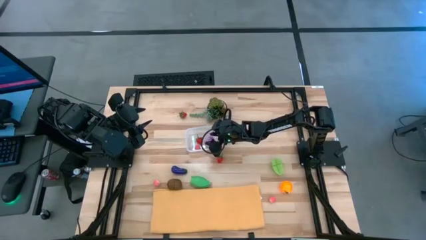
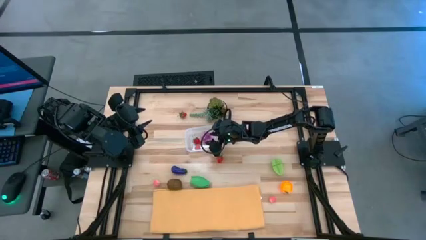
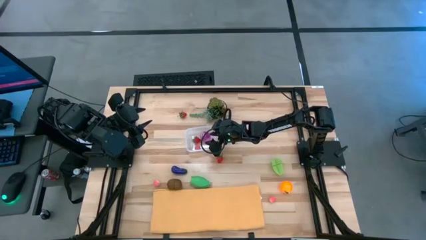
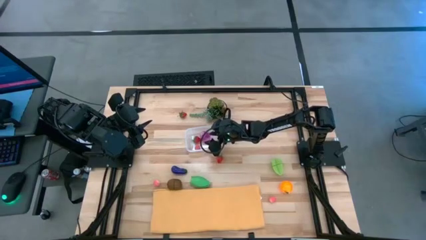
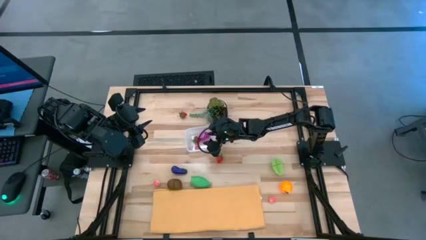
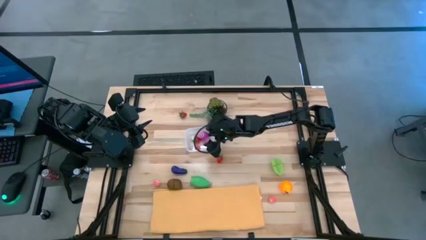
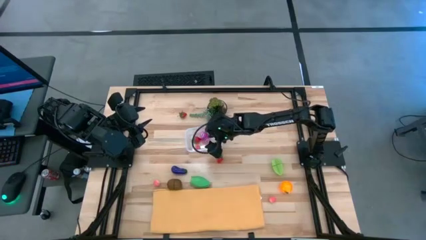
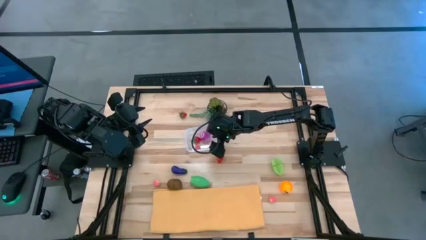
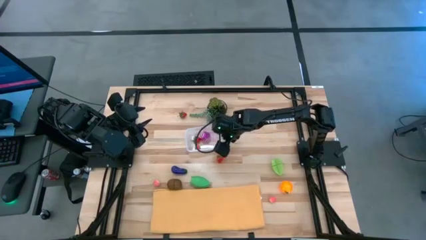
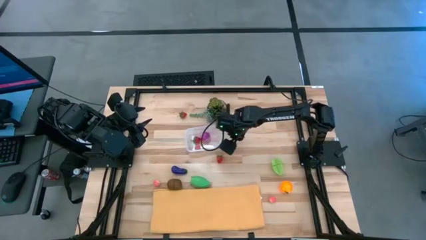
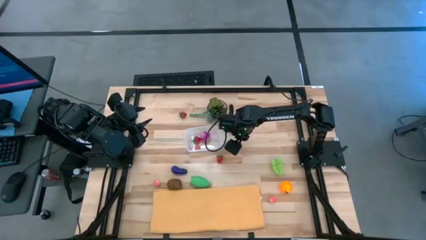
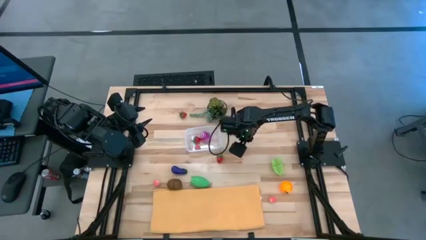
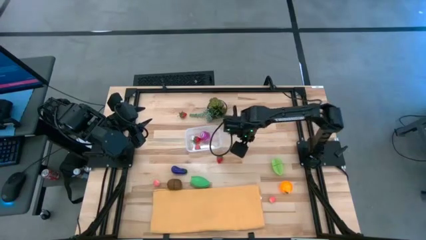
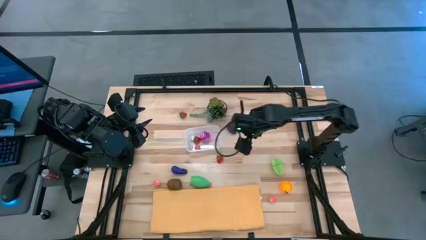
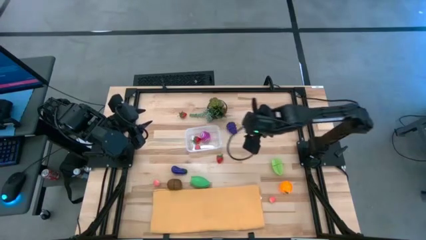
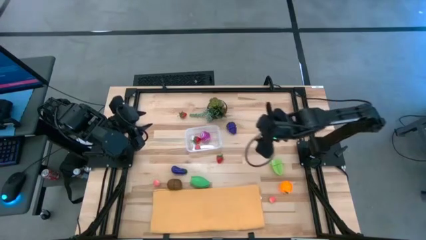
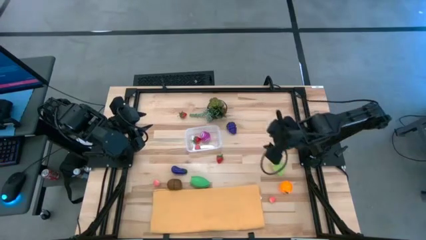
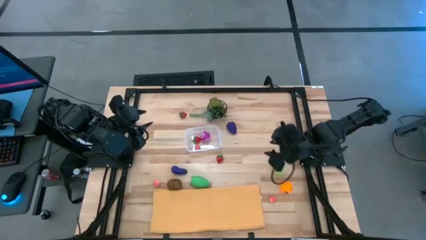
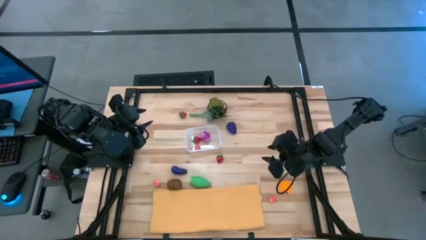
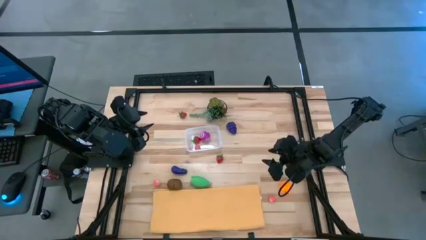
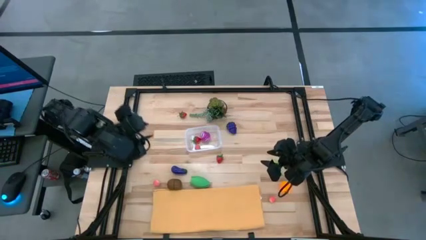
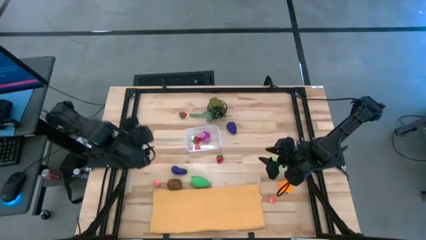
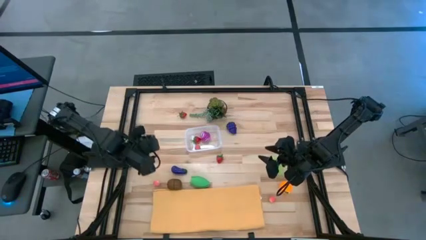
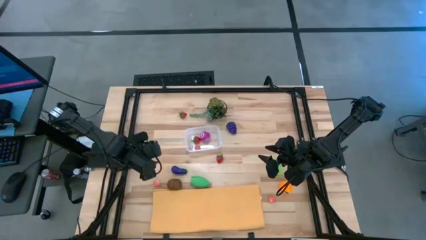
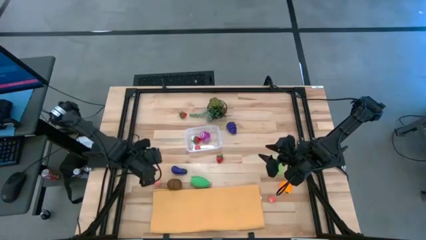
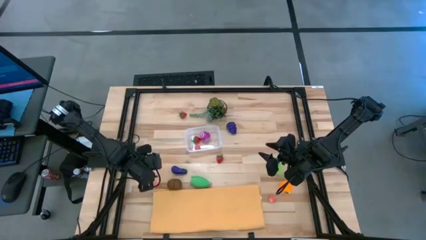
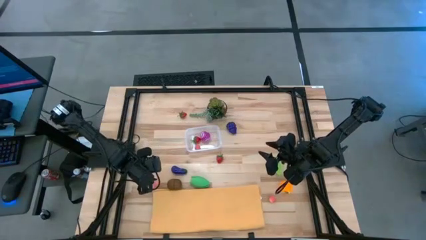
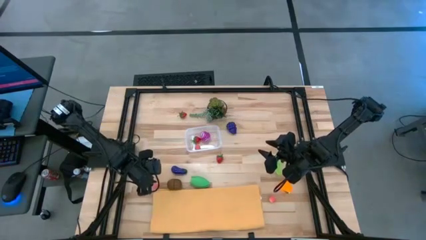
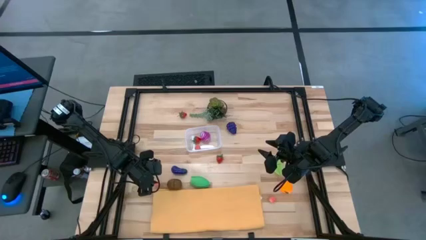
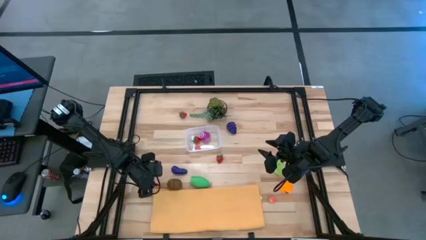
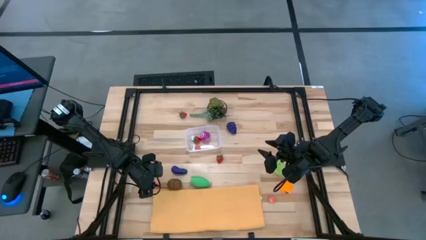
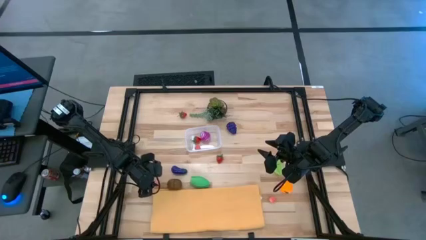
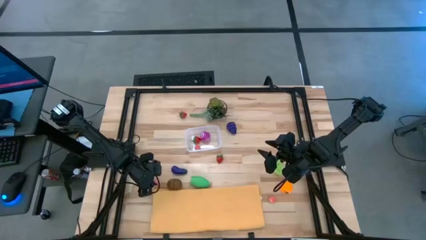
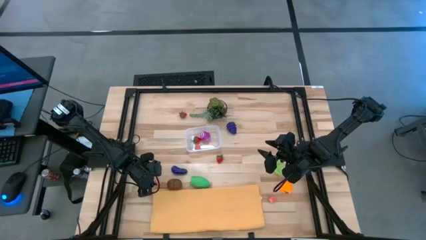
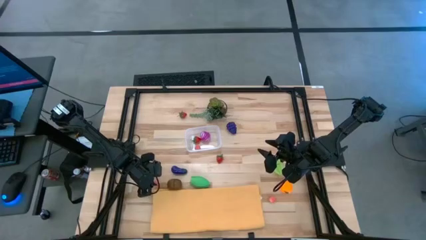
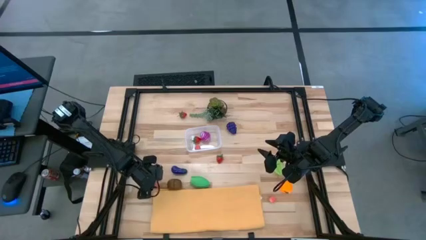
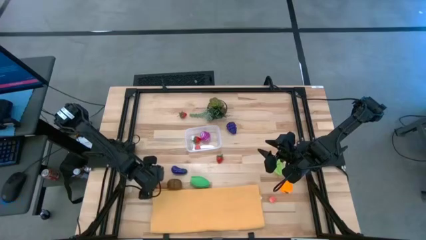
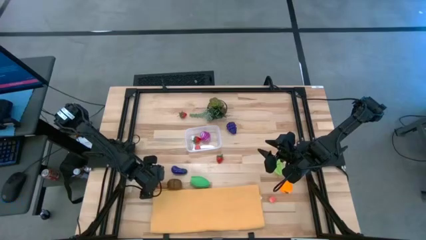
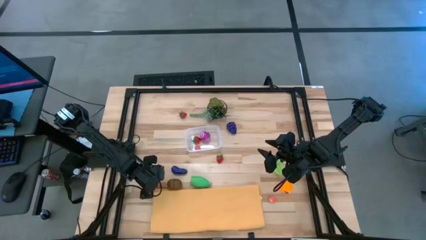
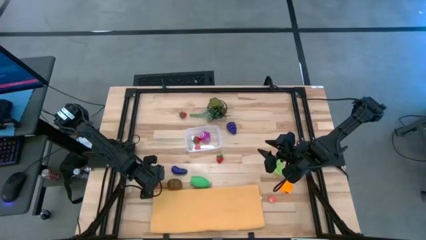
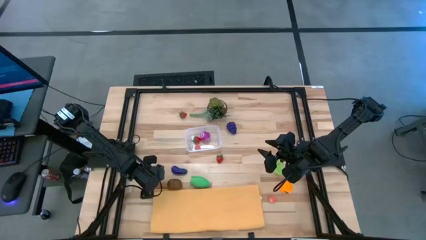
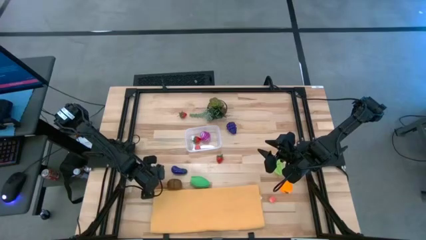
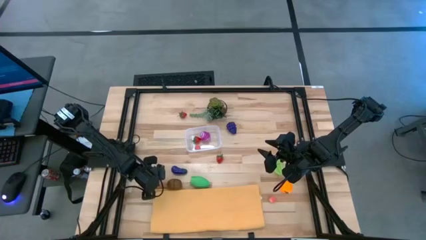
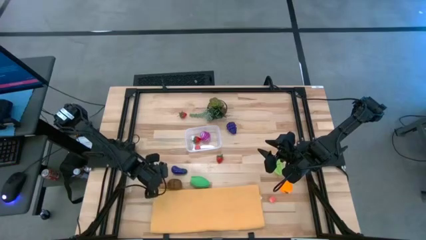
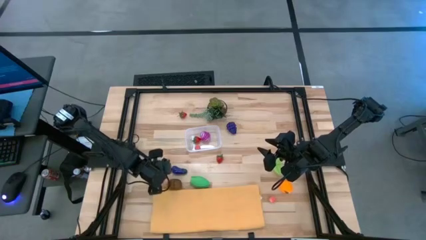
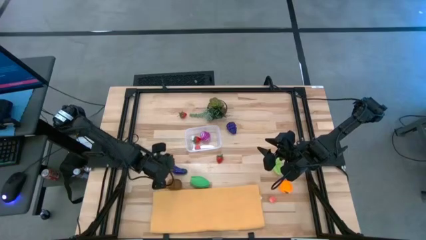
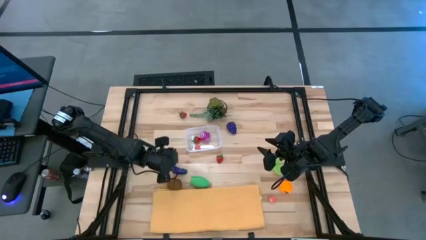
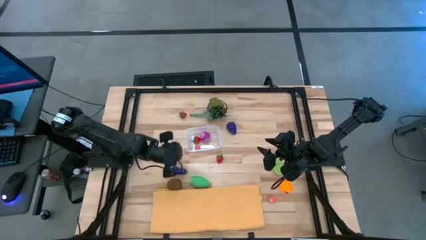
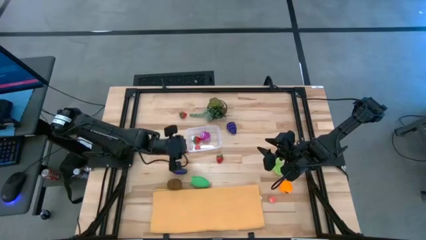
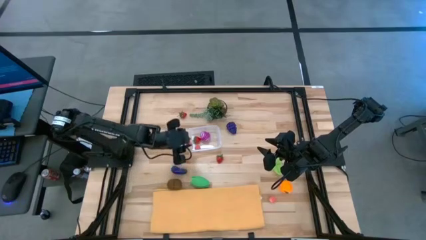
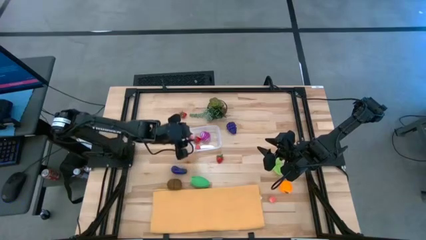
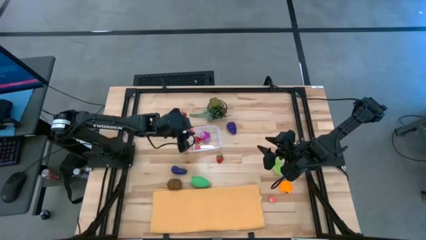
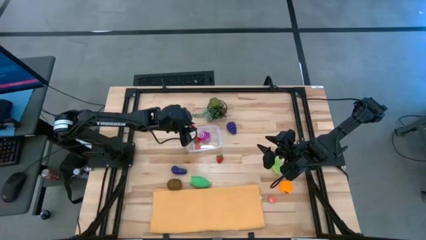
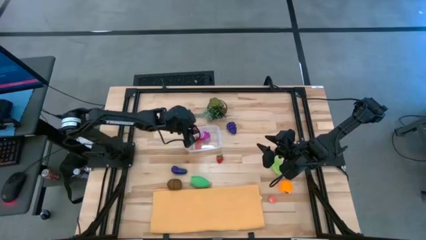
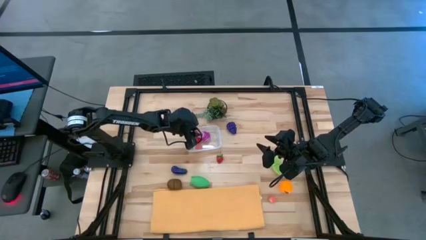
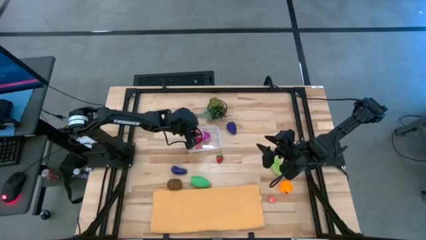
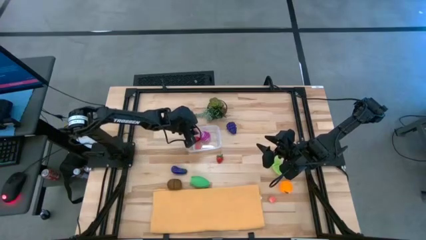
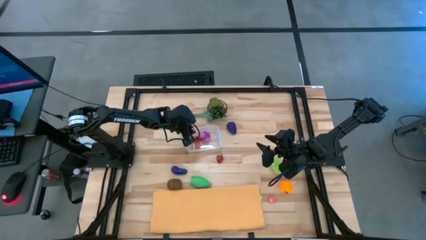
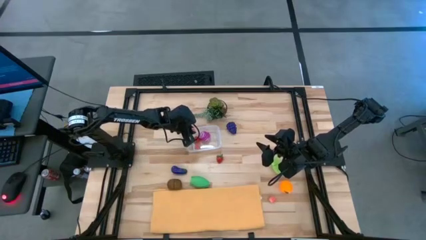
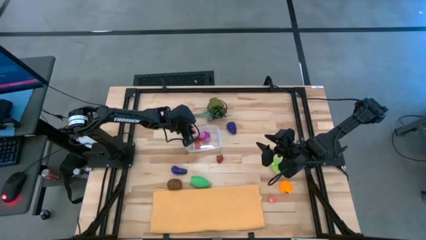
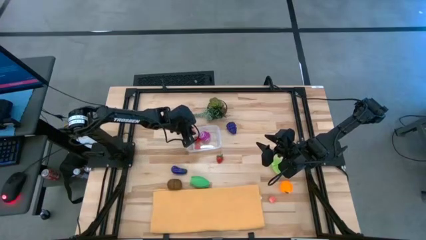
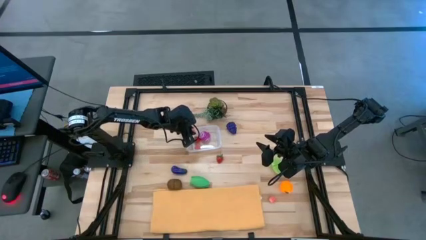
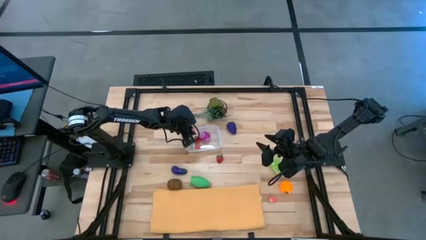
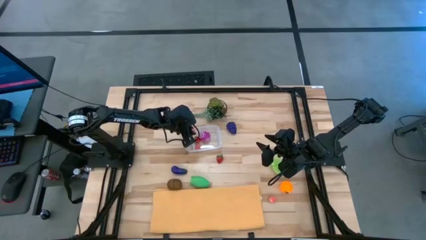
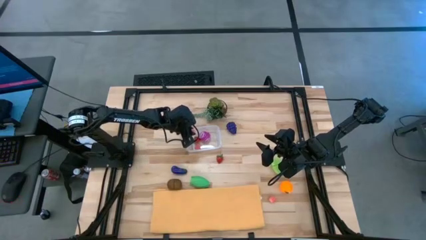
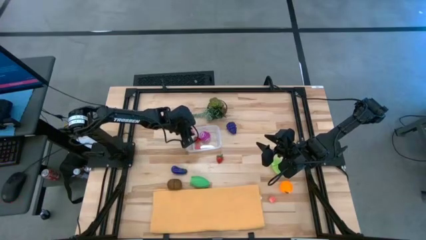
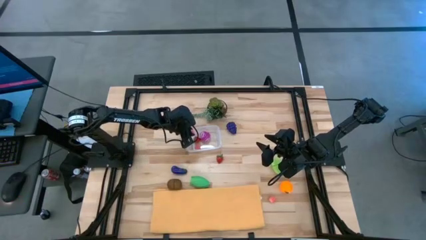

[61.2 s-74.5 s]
Task: Pick and placing Produce into tupperware
Put the left pink peach into the transparent bin

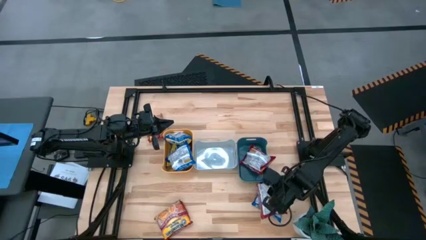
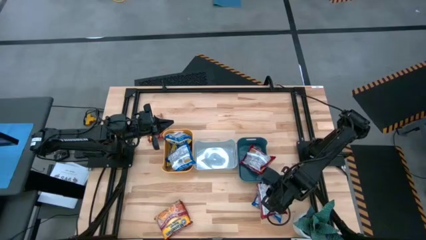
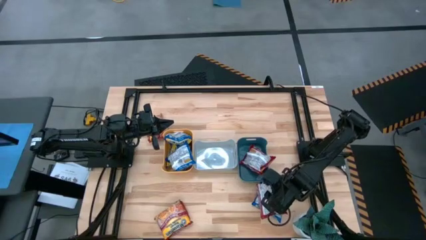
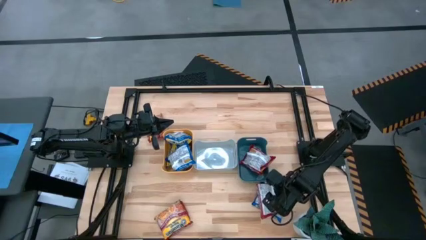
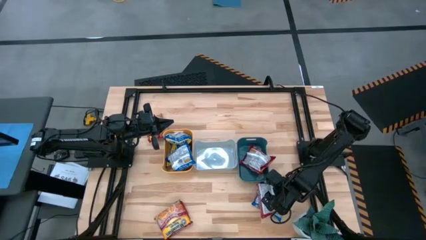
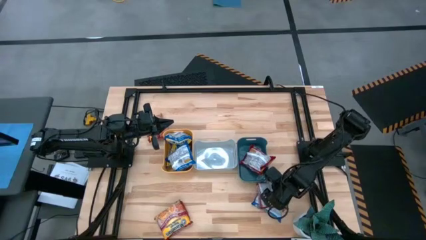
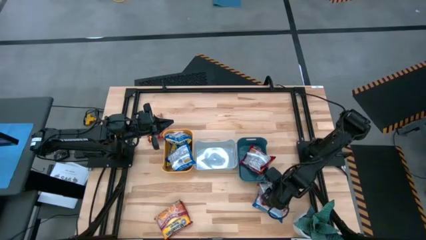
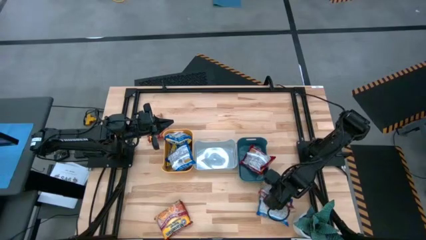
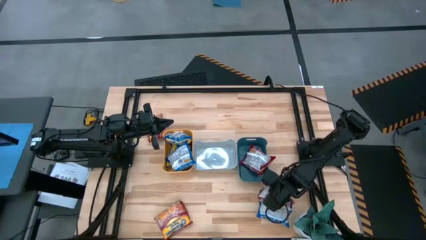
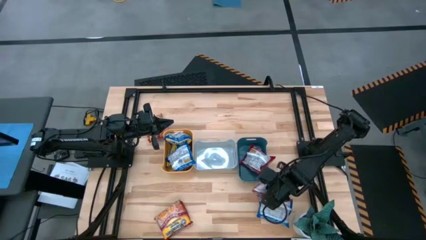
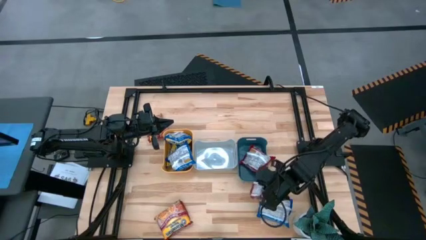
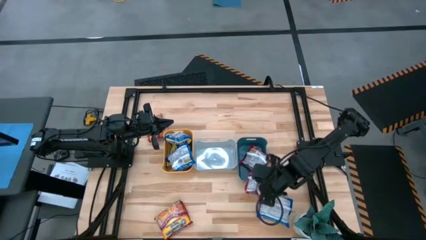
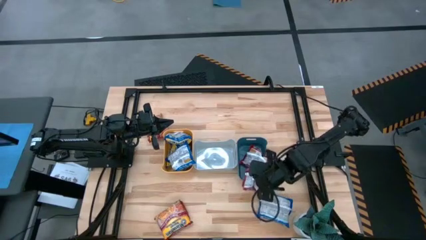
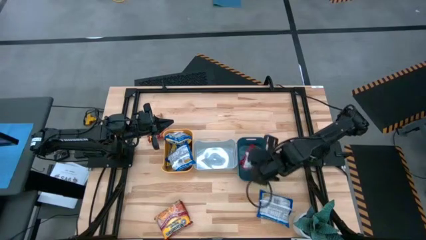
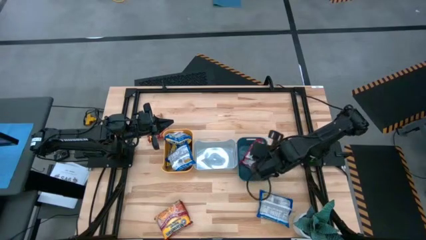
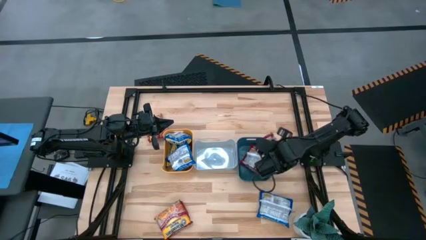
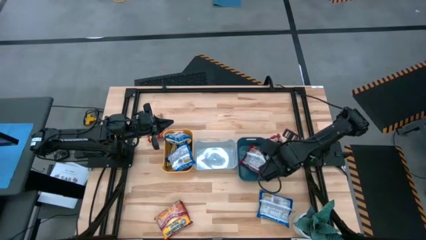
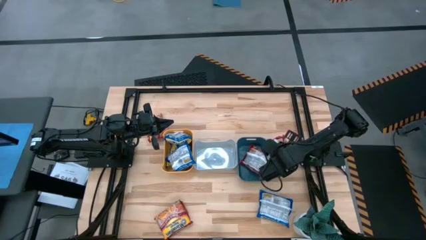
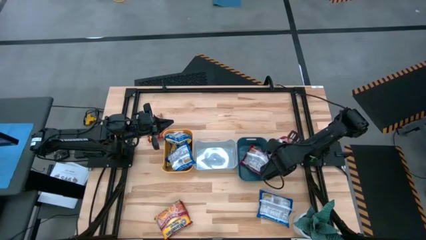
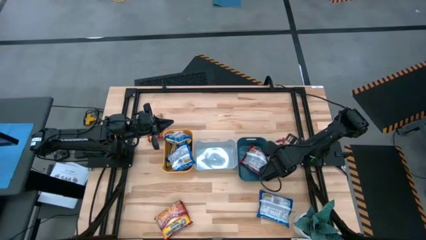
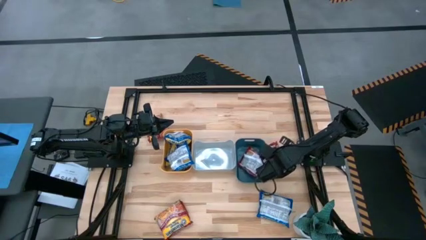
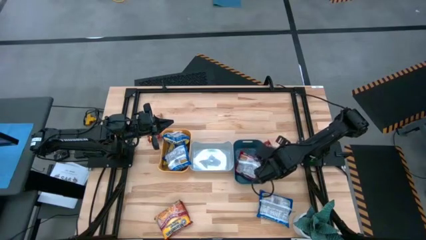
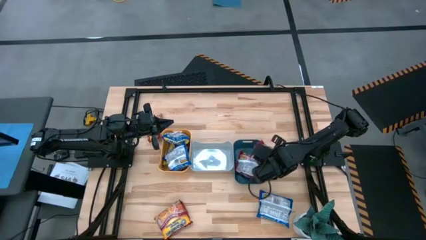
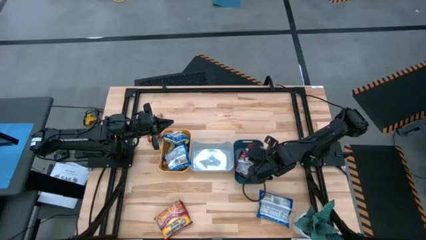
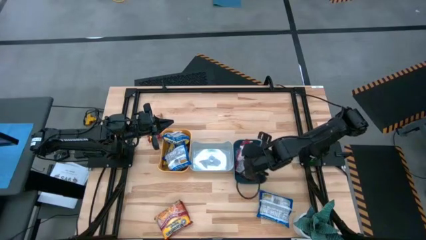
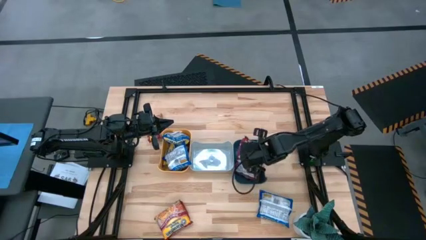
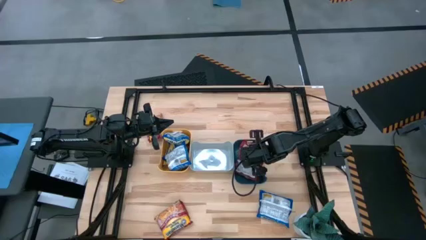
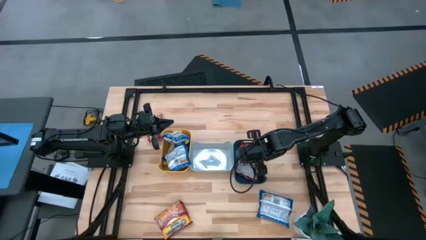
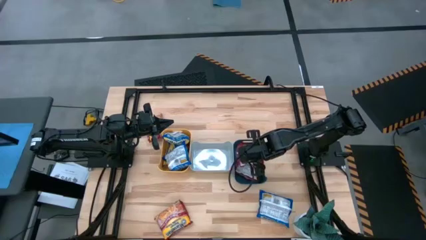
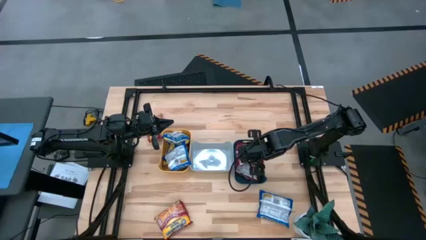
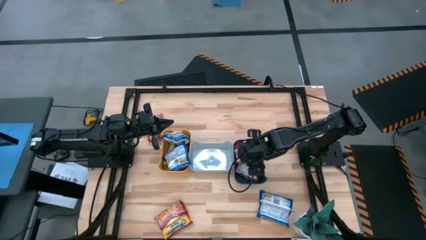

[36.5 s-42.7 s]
Task: Sort Maruchan noodles
Put the bottom right red noodle pack into the blue bin
